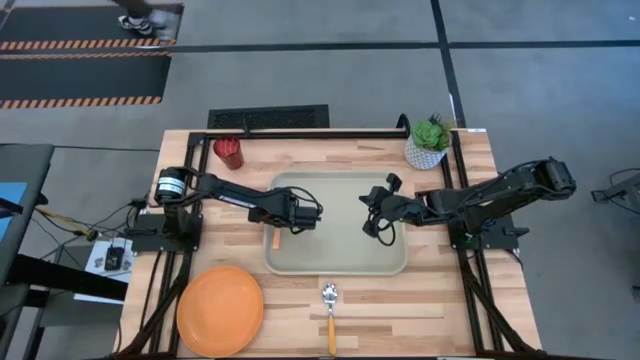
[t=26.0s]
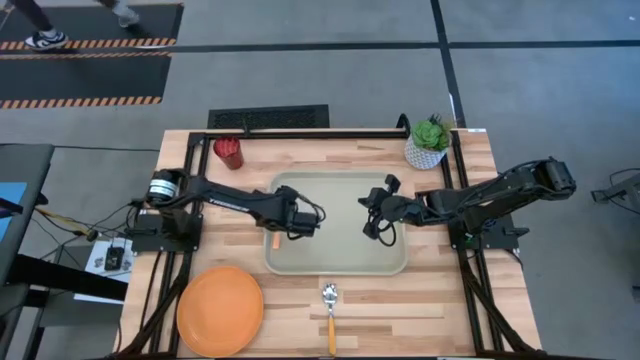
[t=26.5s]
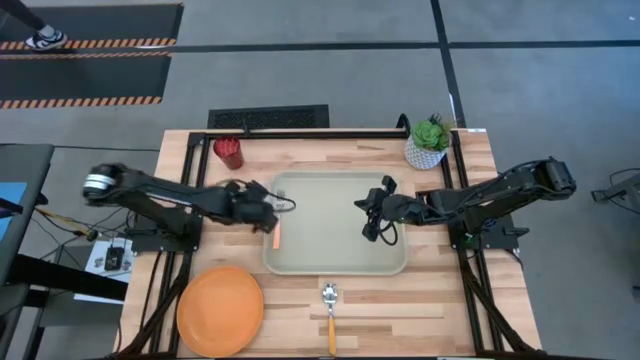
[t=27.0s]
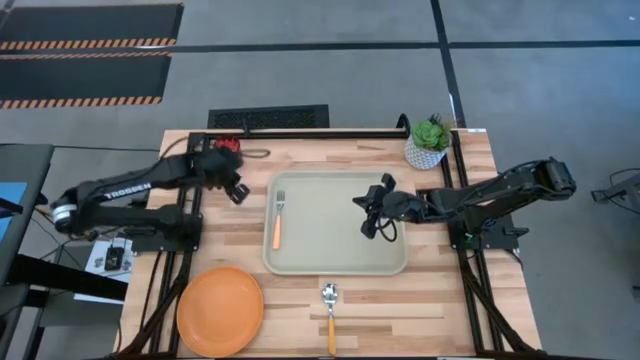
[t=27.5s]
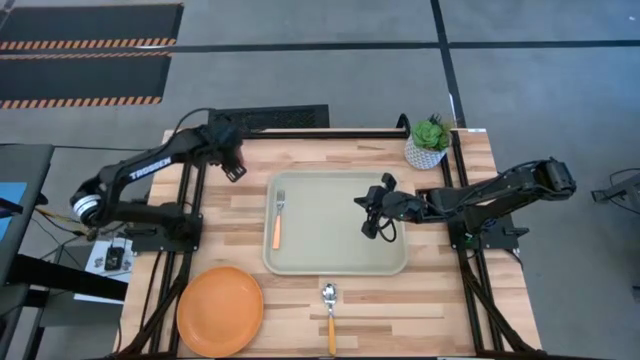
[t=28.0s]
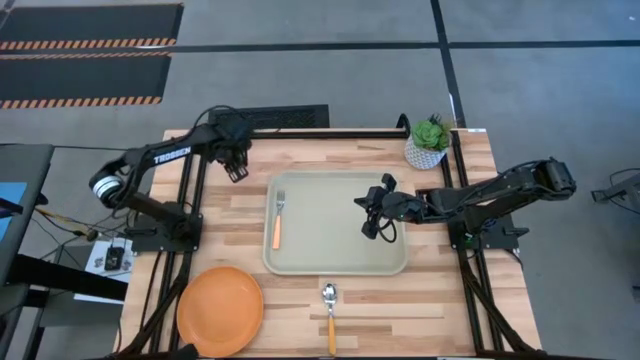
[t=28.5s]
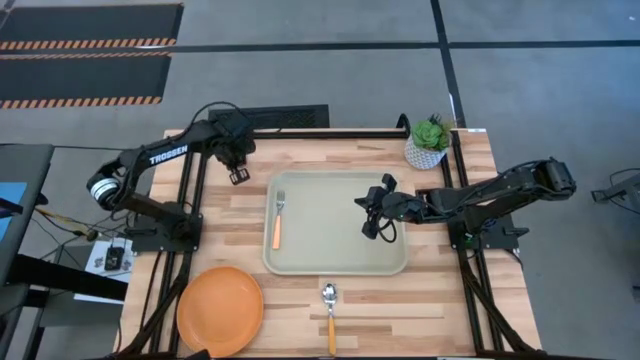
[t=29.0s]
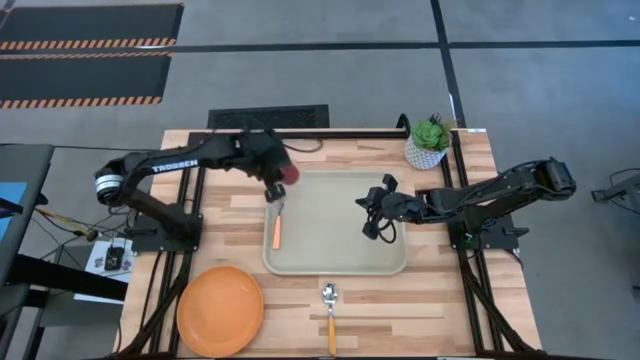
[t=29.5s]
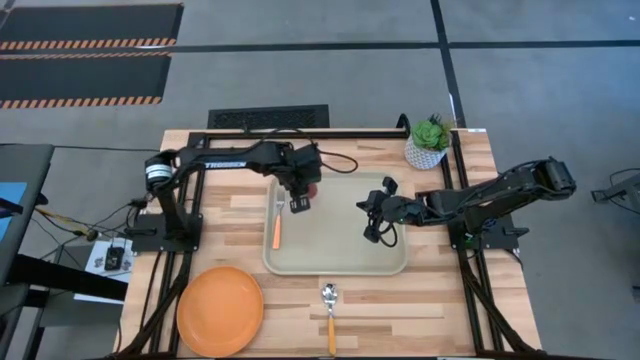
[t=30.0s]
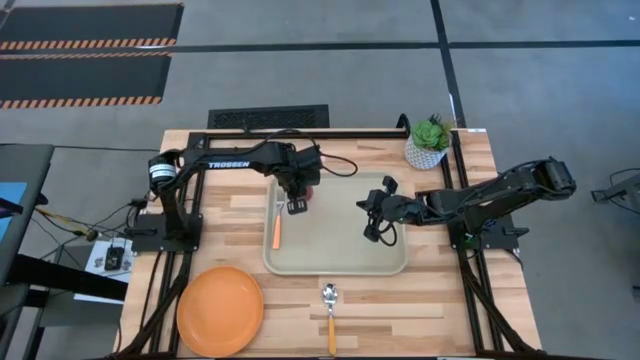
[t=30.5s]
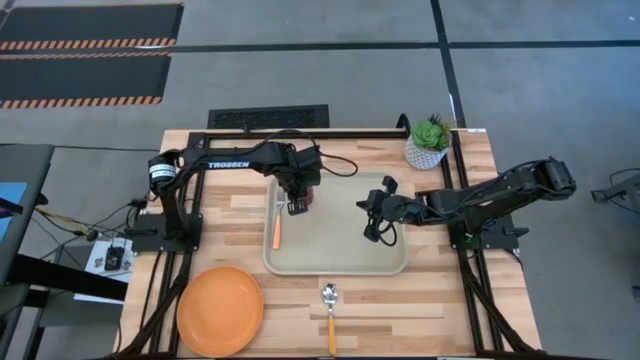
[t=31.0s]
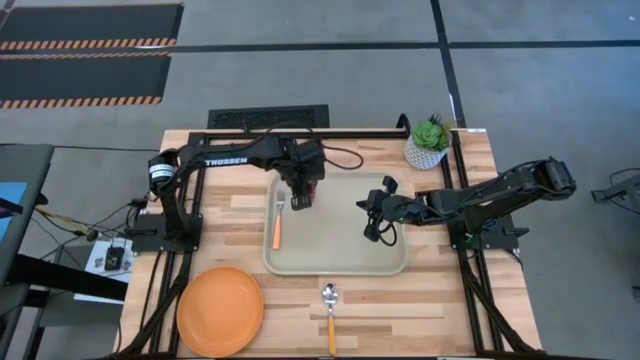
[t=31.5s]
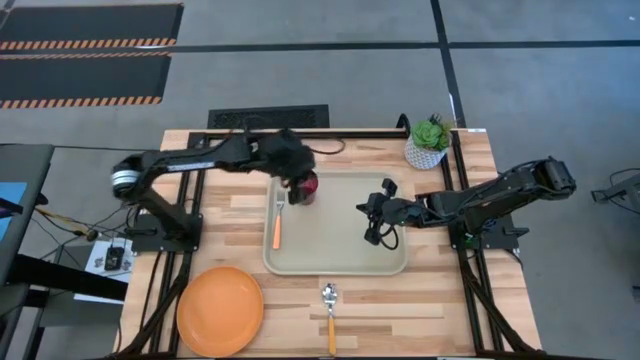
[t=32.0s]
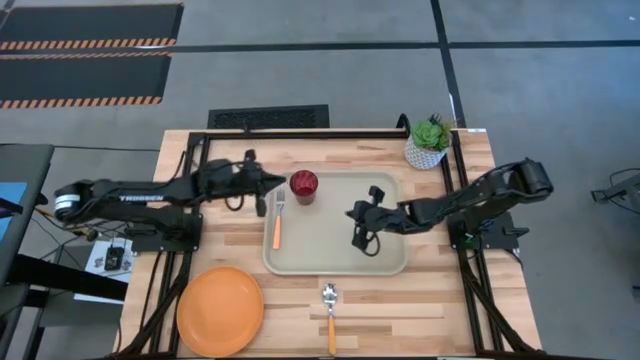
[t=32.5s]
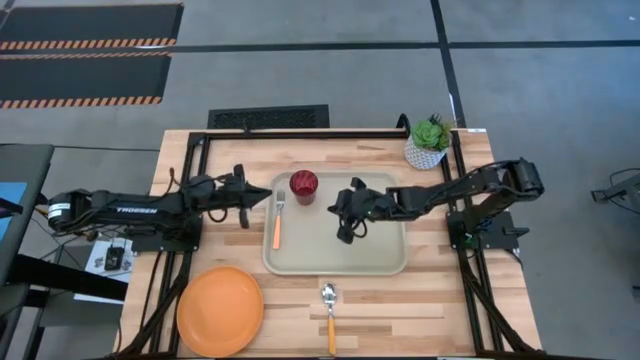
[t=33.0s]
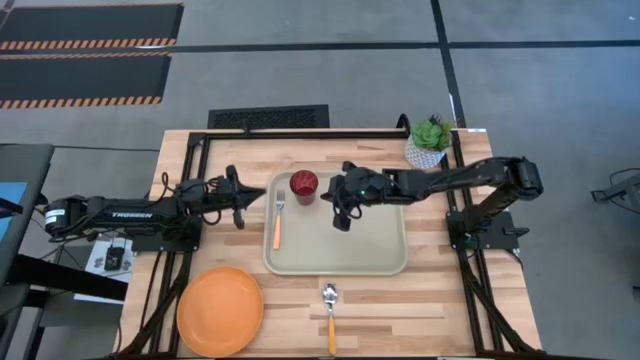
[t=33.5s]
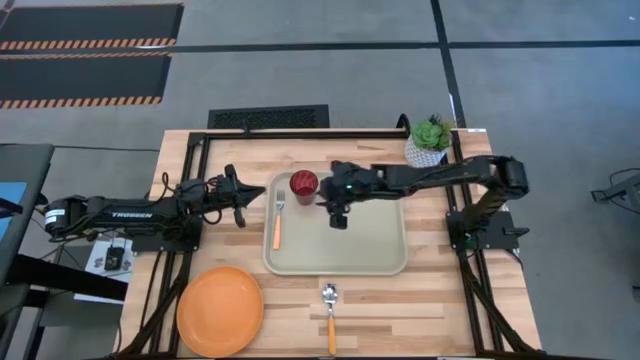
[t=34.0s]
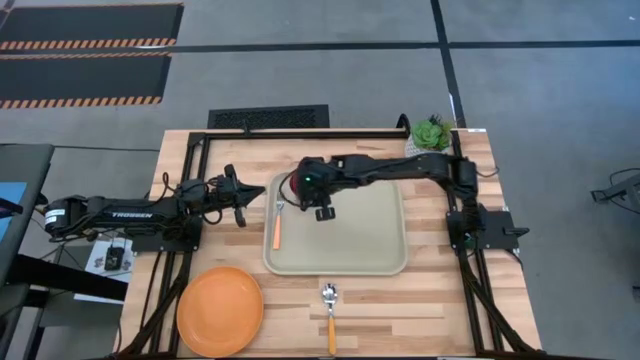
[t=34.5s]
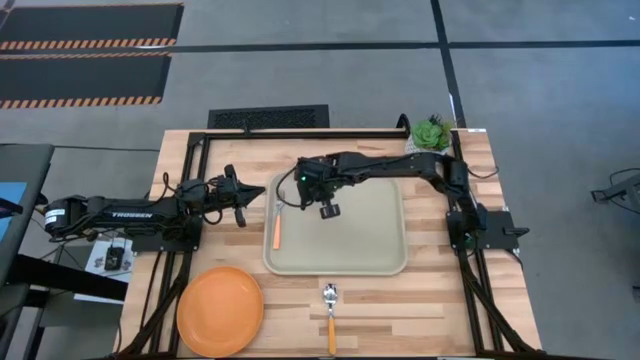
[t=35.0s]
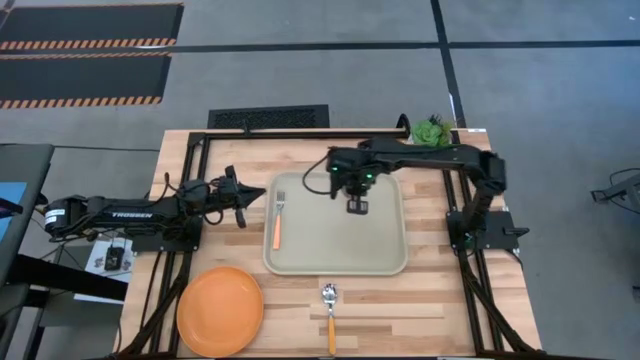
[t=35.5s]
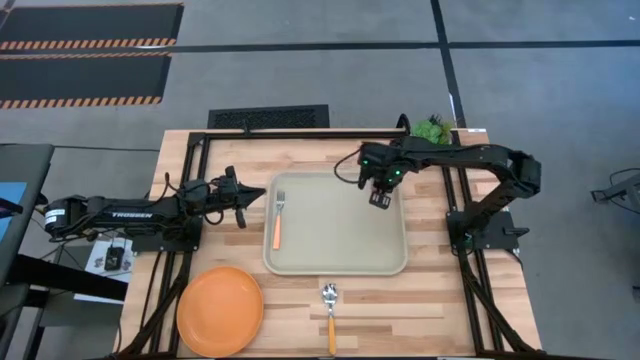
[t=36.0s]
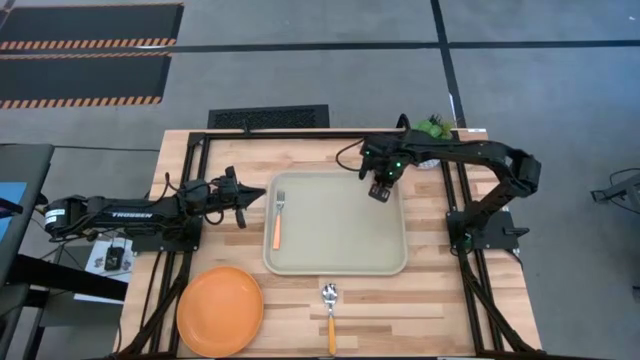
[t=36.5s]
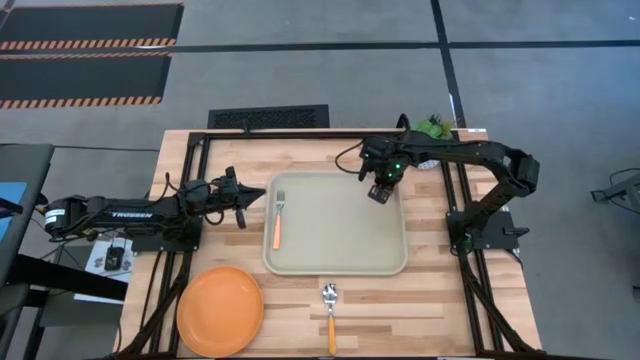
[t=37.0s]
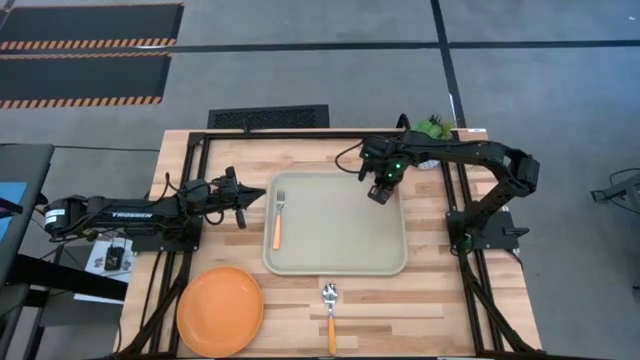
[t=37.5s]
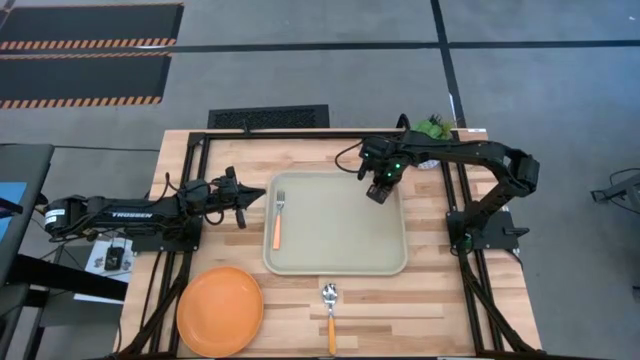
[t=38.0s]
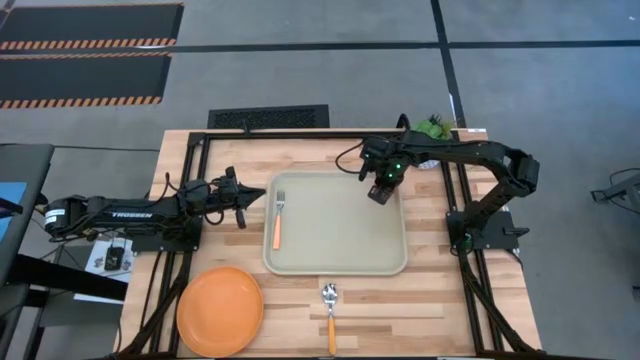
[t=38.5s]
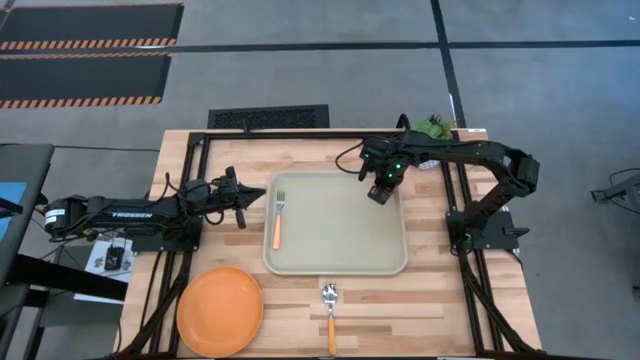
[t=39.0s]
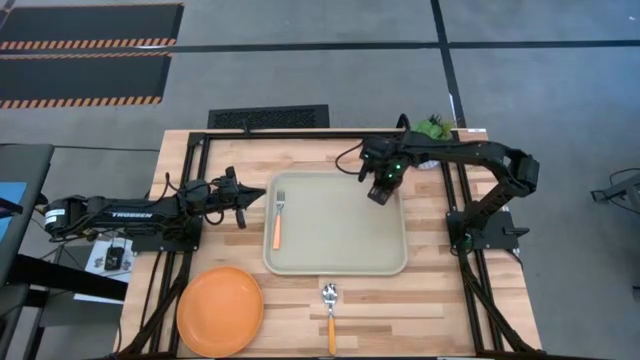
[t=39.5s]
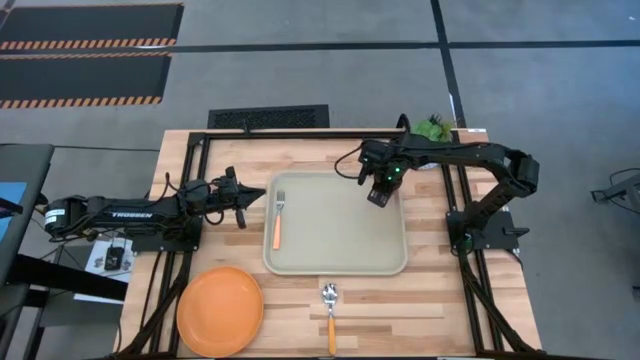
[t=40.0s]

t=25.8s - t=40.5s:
Task: Pick and place plate/cup/fork/spoon on tray
Put the red glass on the top right of the light brown serving tray

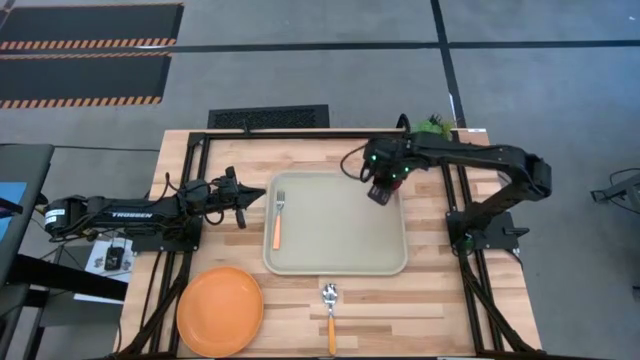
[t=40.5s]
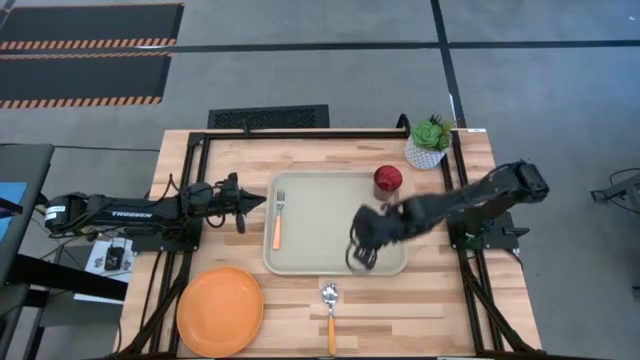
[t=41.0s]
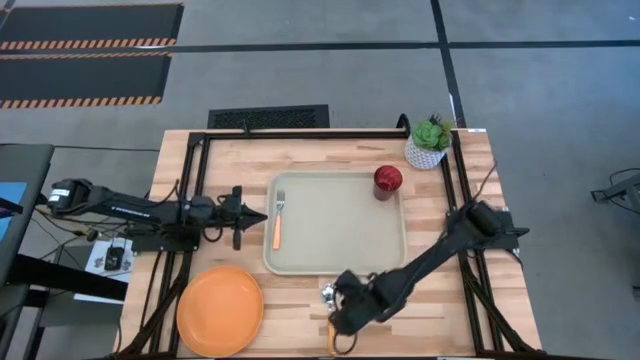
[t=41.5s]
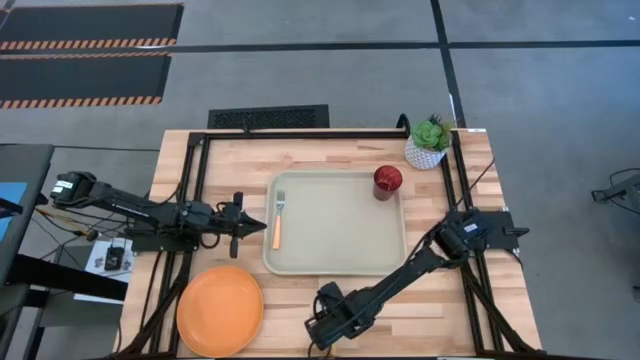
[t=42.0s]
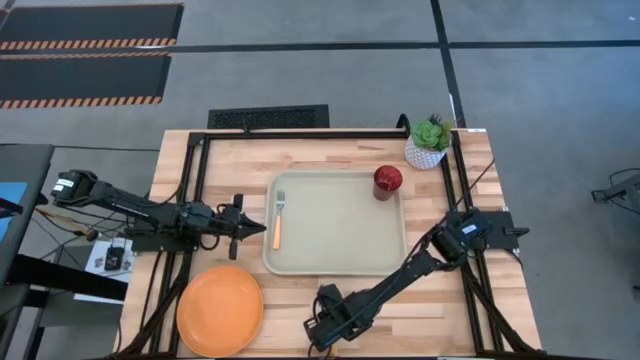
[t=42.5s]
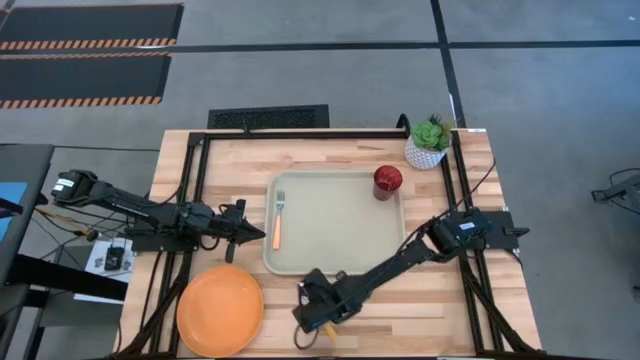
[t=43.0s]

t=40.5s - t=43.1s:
Put the yellow spoon on the light brown serving tray to the right of the orange fork

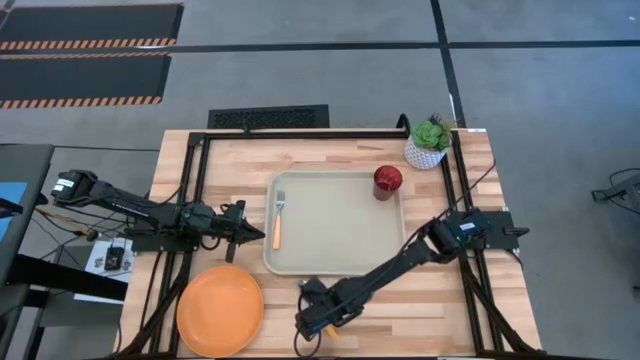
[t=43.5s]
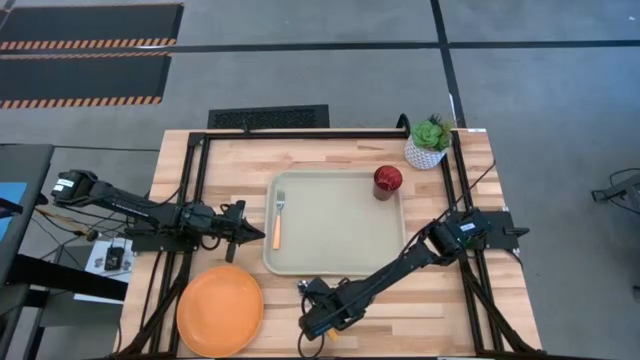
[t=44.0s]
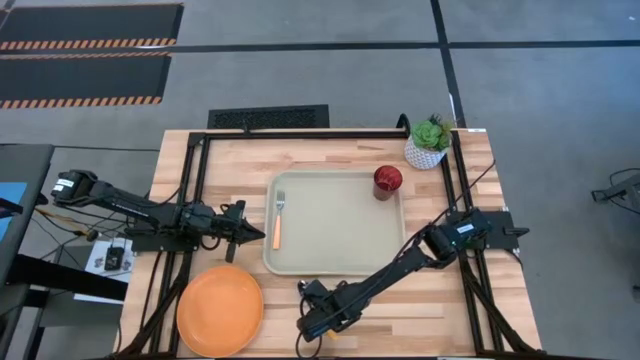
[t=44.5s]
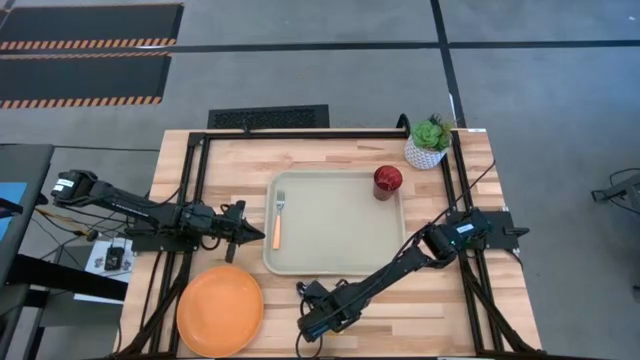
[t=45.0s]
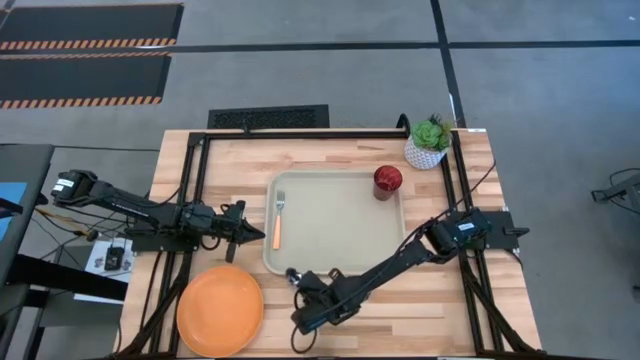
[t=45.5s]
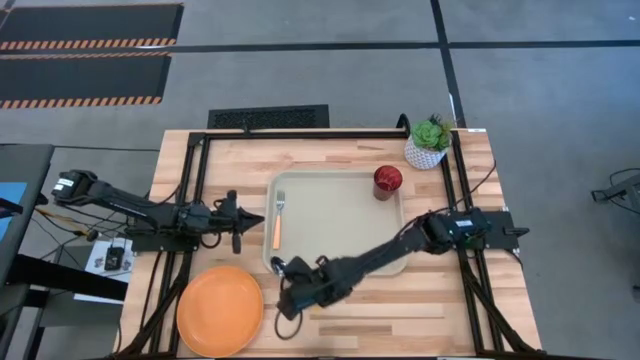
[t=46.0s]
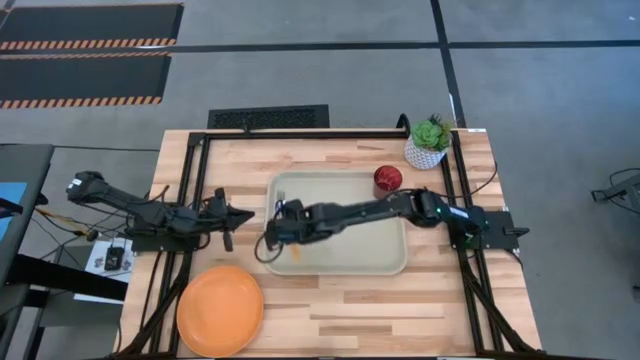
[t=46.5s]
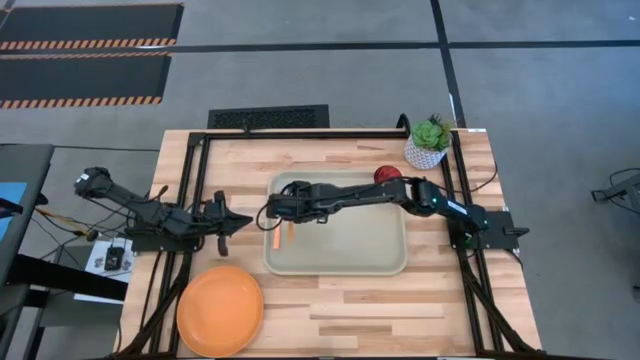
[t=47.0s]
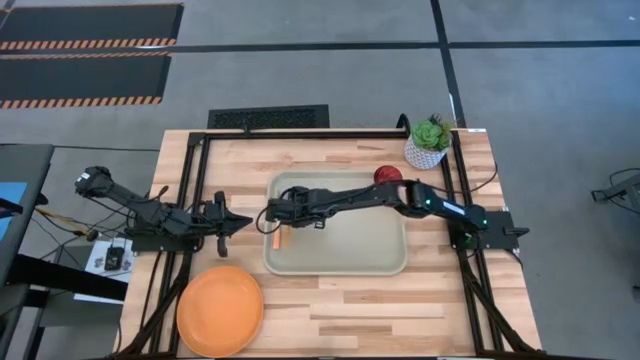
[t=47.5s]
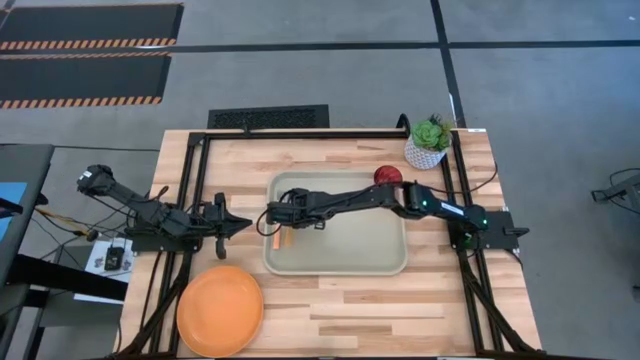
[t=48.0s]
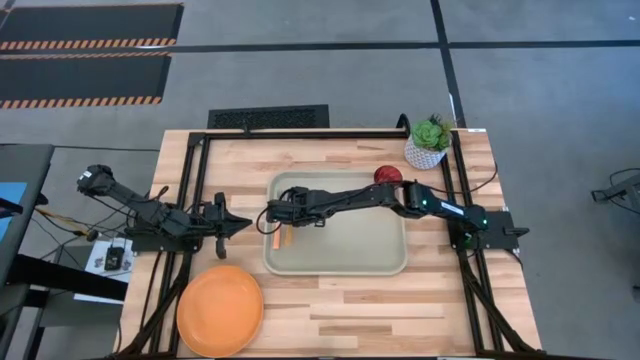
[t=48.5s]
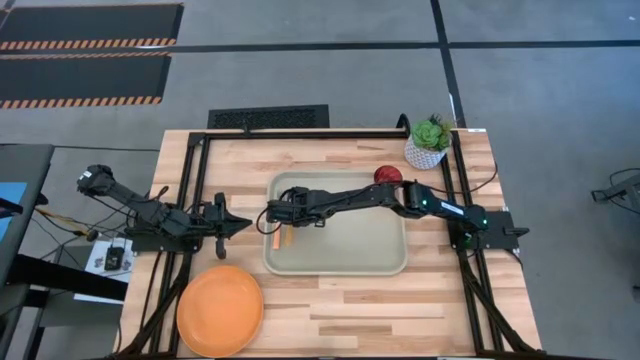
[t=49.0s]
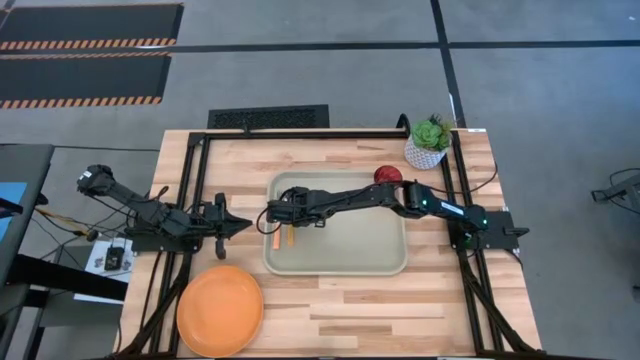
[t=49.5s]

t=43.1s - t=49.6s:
Put the yellow spoon on the light brown serving tray to the right of the orange fork
